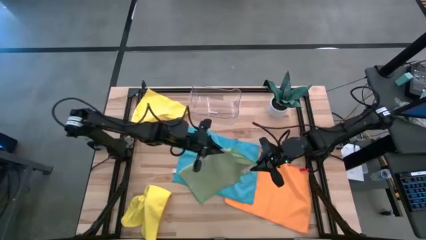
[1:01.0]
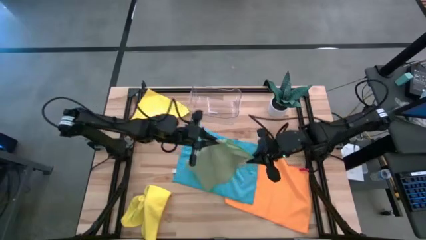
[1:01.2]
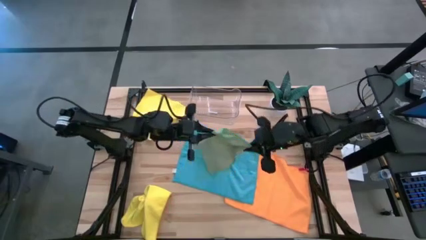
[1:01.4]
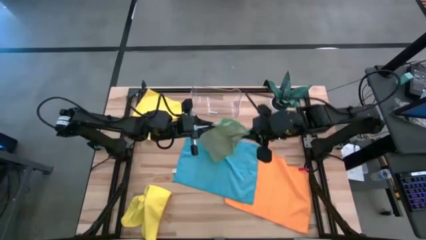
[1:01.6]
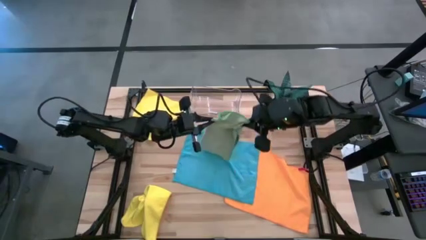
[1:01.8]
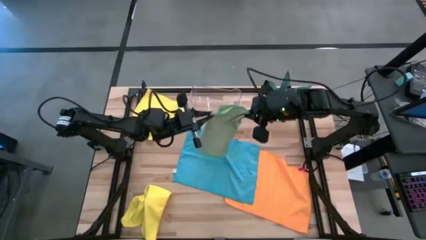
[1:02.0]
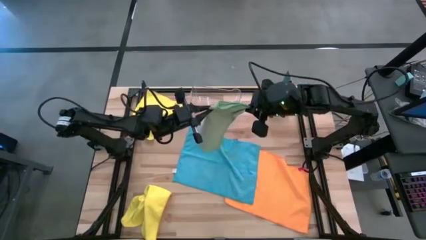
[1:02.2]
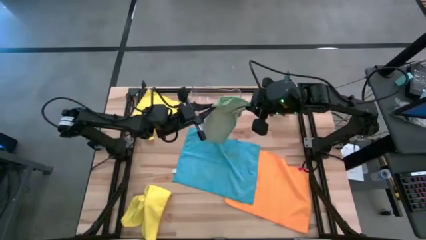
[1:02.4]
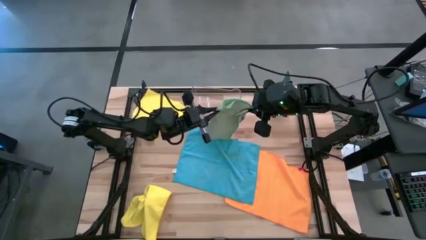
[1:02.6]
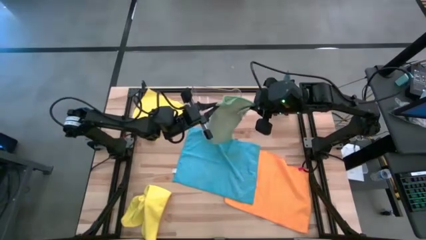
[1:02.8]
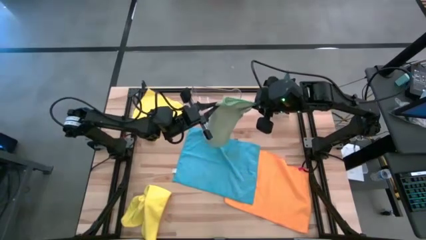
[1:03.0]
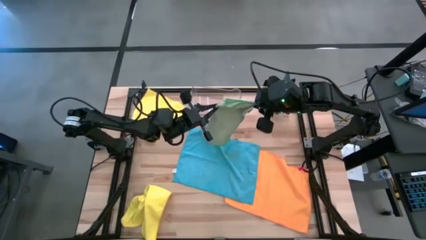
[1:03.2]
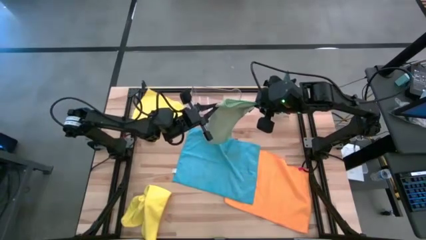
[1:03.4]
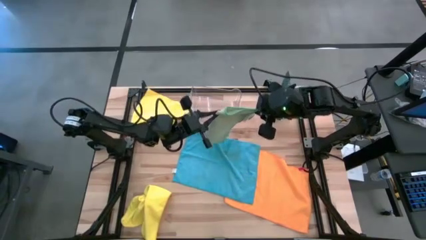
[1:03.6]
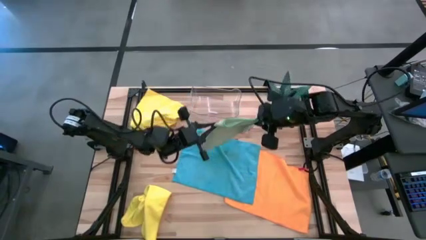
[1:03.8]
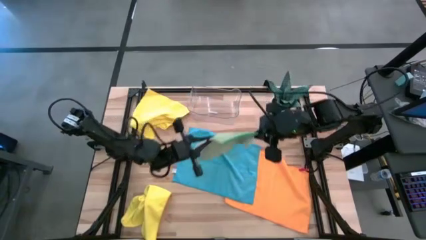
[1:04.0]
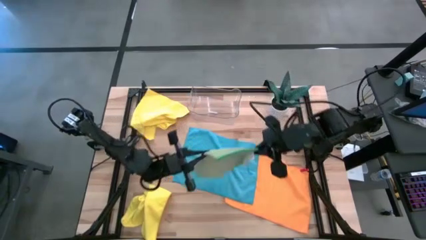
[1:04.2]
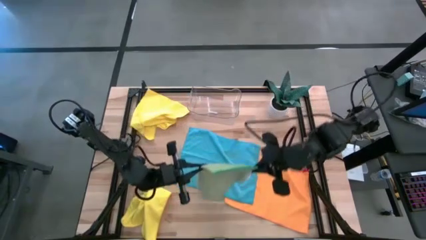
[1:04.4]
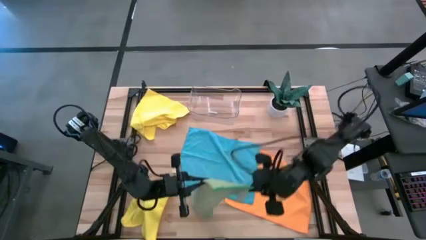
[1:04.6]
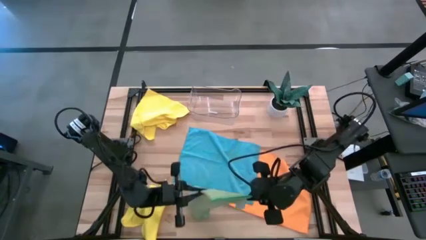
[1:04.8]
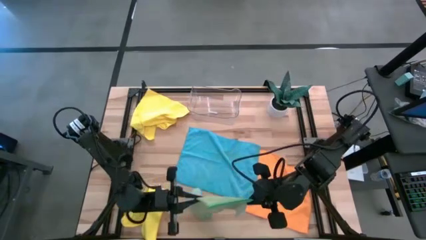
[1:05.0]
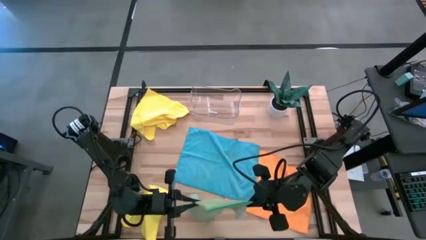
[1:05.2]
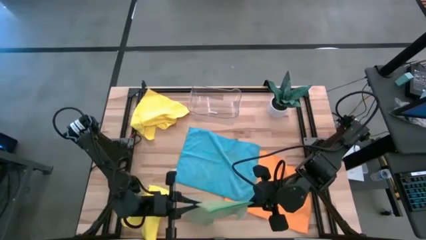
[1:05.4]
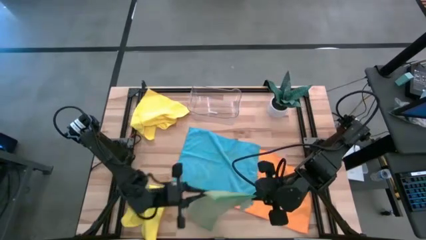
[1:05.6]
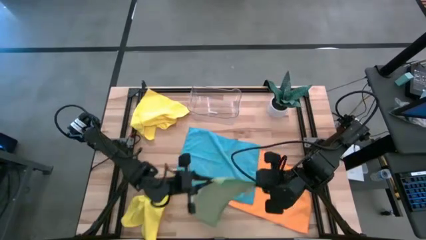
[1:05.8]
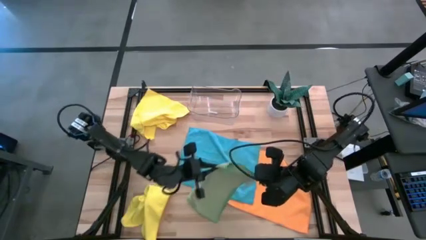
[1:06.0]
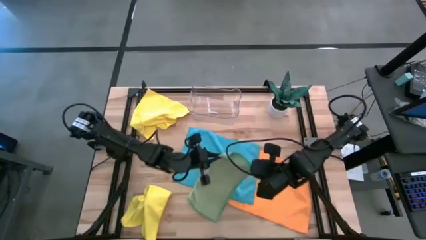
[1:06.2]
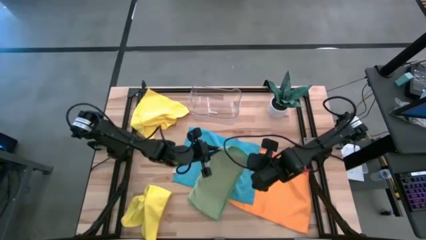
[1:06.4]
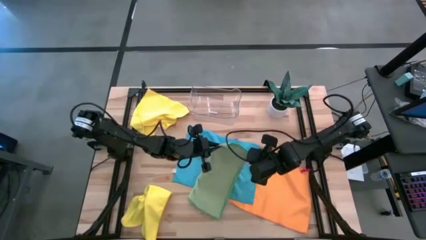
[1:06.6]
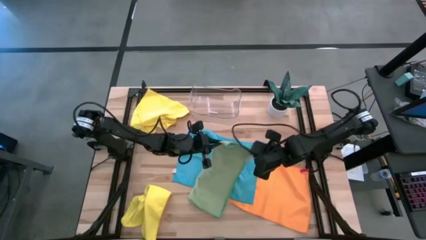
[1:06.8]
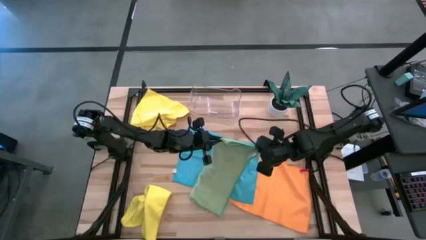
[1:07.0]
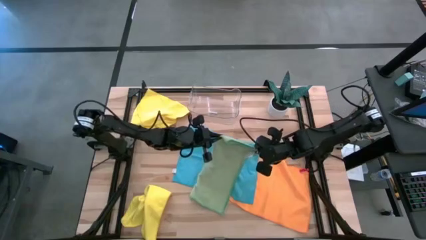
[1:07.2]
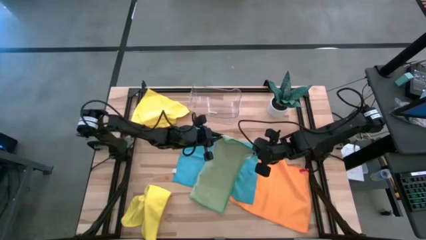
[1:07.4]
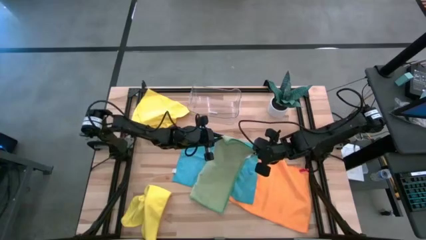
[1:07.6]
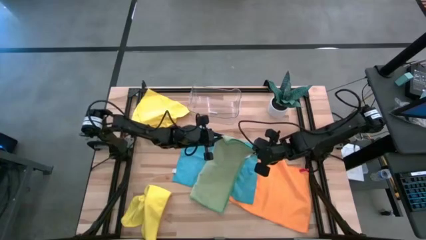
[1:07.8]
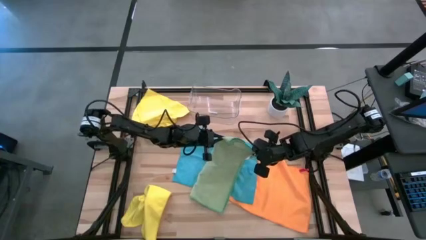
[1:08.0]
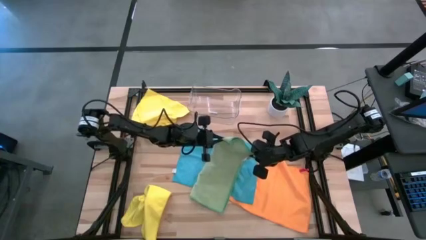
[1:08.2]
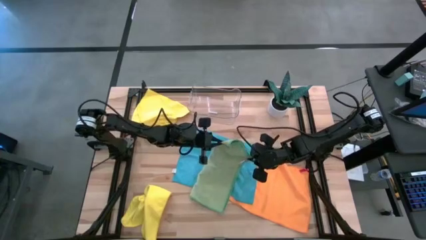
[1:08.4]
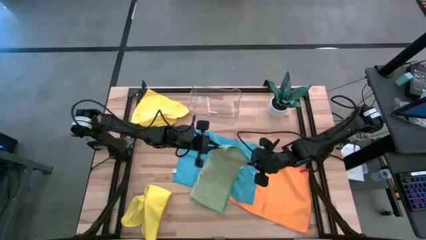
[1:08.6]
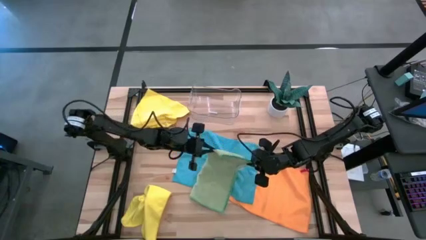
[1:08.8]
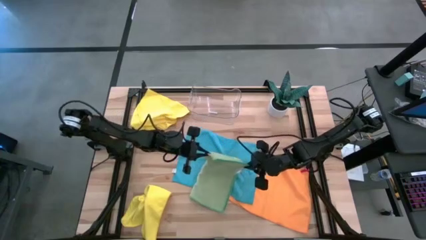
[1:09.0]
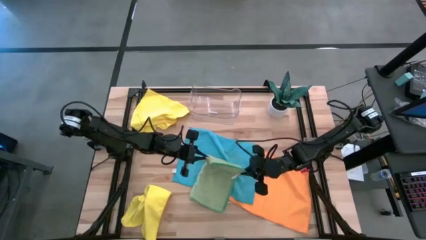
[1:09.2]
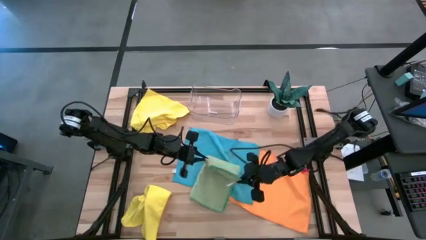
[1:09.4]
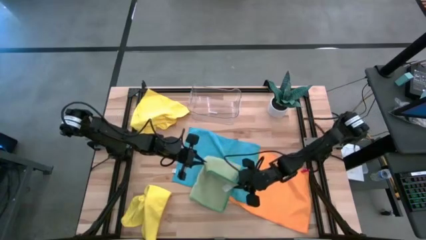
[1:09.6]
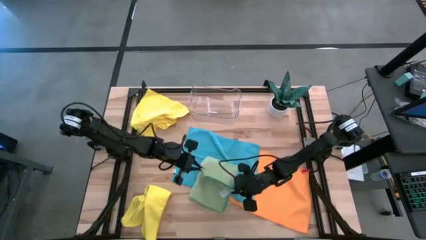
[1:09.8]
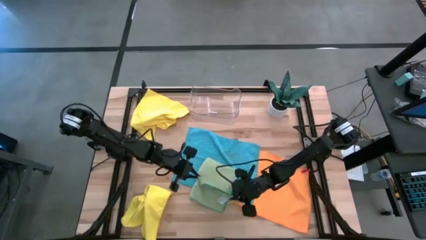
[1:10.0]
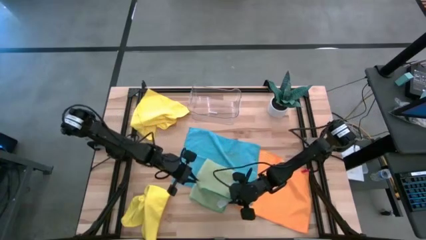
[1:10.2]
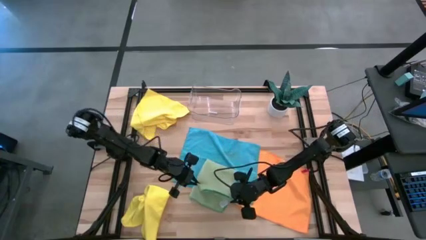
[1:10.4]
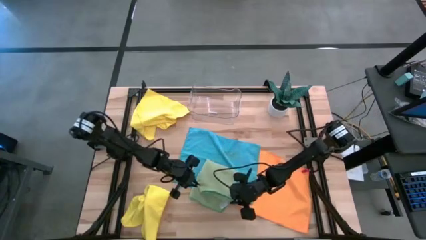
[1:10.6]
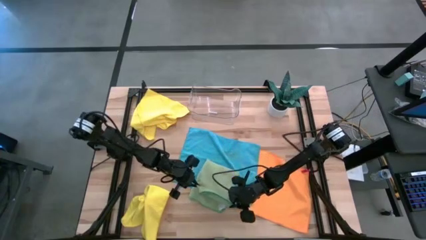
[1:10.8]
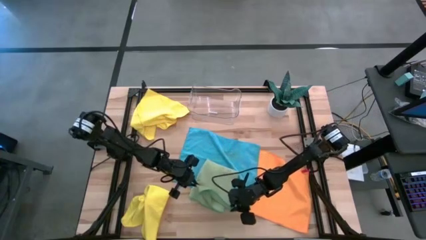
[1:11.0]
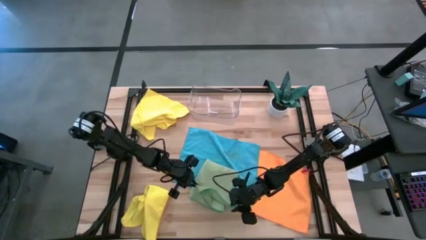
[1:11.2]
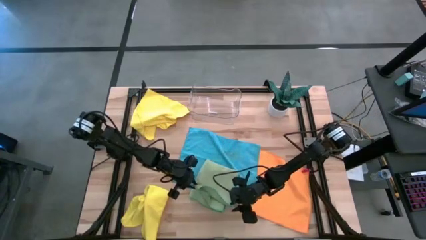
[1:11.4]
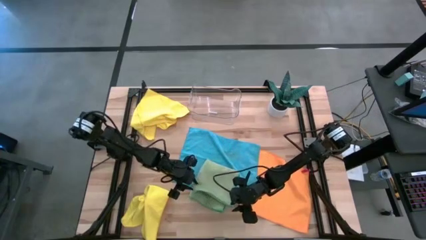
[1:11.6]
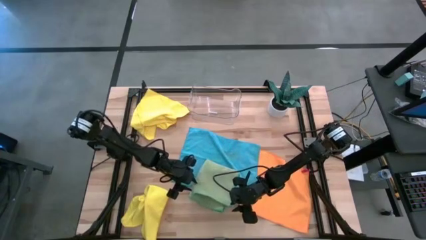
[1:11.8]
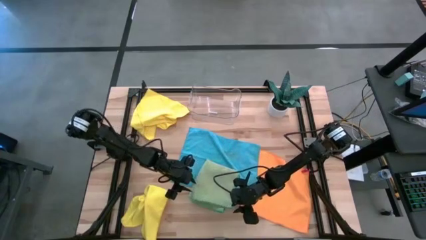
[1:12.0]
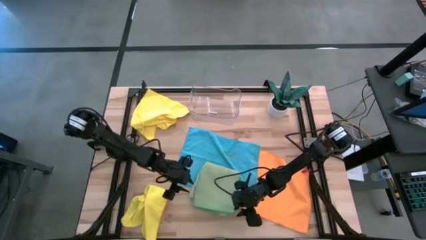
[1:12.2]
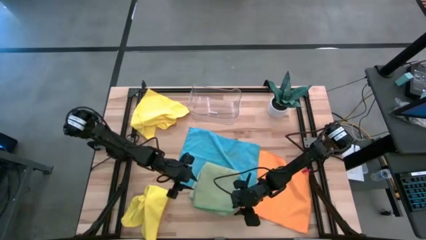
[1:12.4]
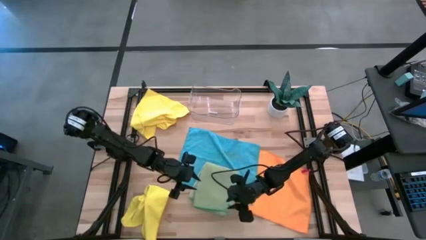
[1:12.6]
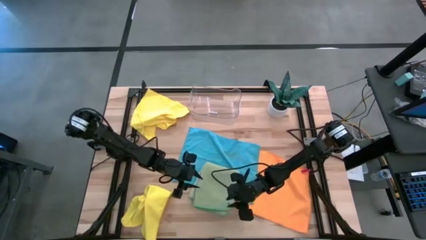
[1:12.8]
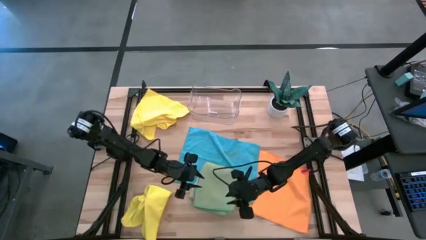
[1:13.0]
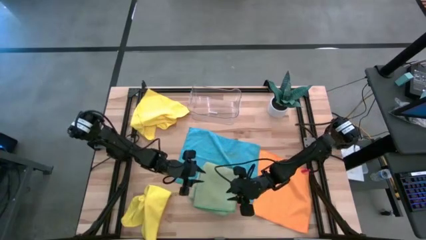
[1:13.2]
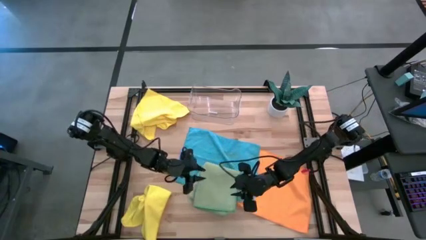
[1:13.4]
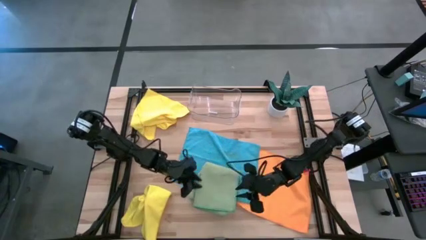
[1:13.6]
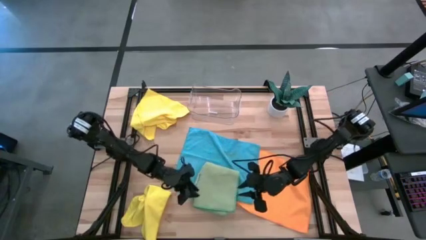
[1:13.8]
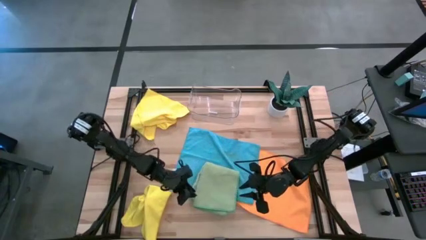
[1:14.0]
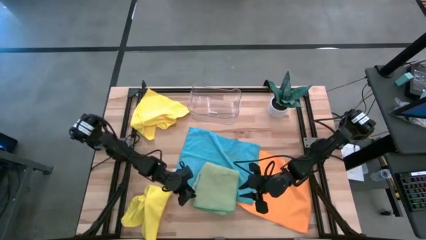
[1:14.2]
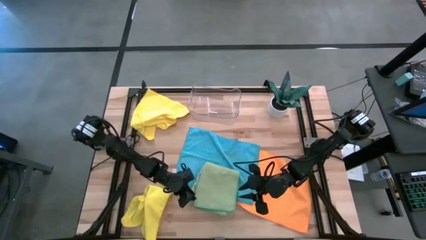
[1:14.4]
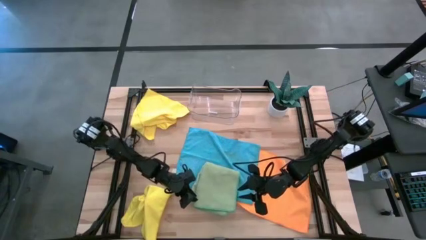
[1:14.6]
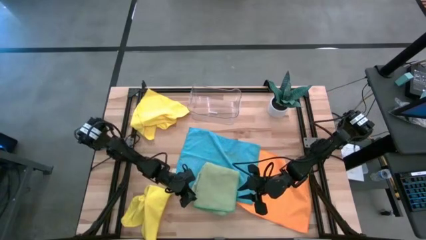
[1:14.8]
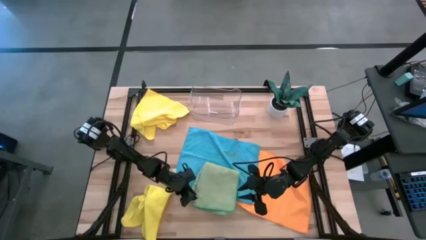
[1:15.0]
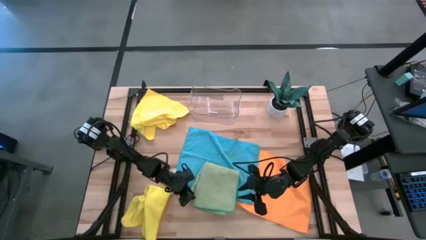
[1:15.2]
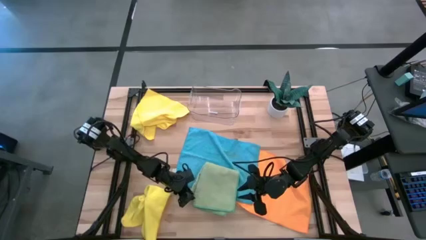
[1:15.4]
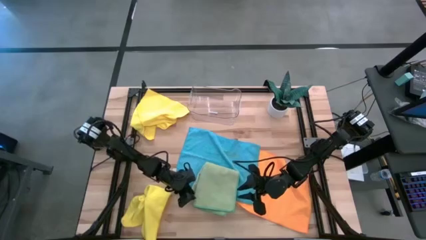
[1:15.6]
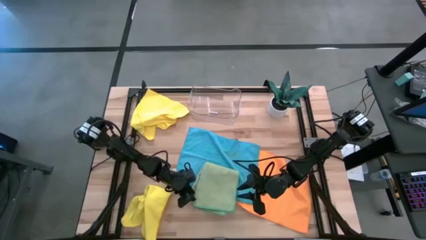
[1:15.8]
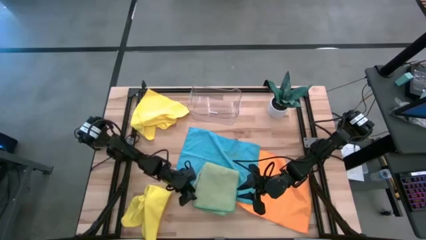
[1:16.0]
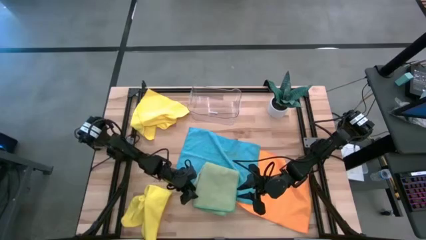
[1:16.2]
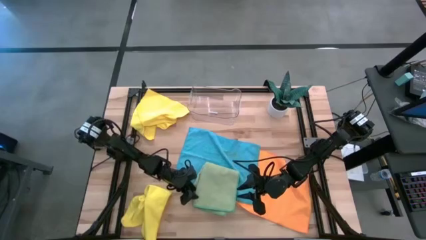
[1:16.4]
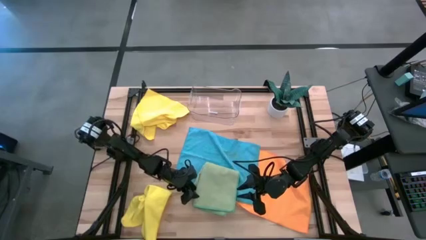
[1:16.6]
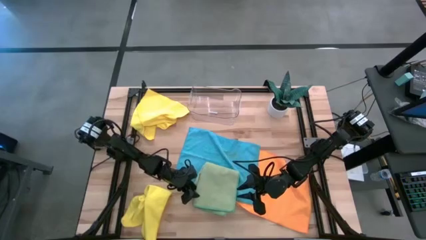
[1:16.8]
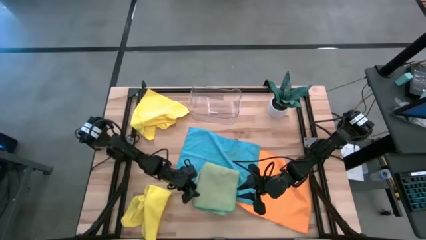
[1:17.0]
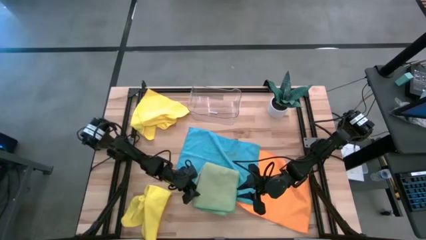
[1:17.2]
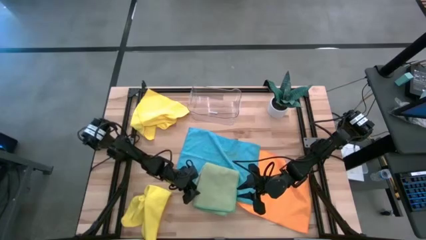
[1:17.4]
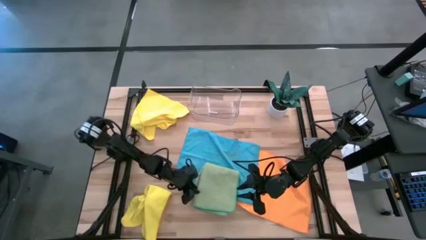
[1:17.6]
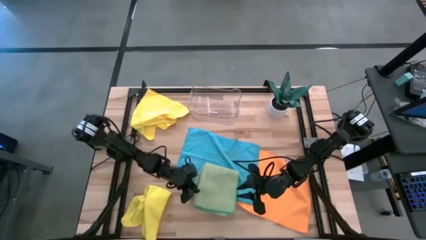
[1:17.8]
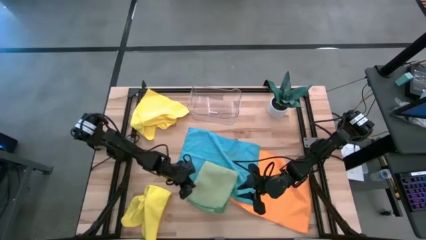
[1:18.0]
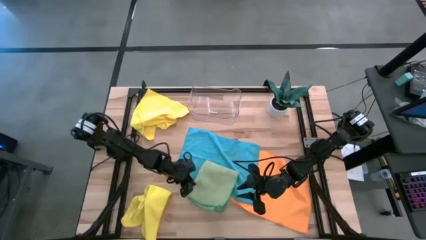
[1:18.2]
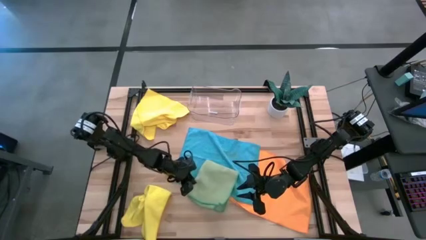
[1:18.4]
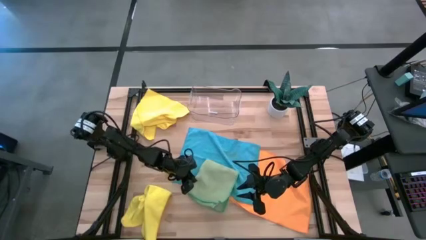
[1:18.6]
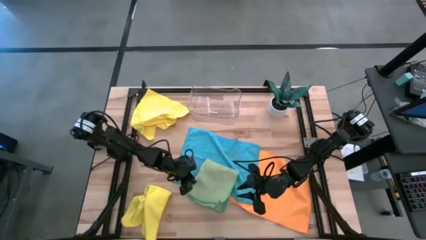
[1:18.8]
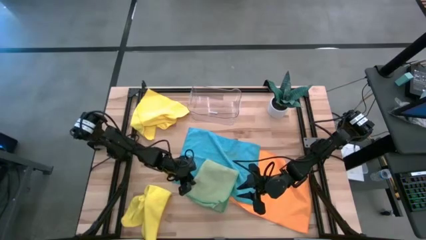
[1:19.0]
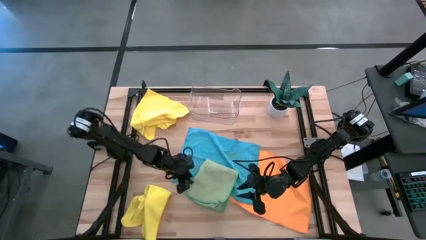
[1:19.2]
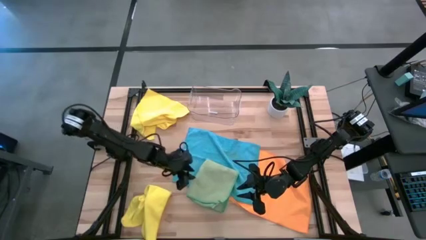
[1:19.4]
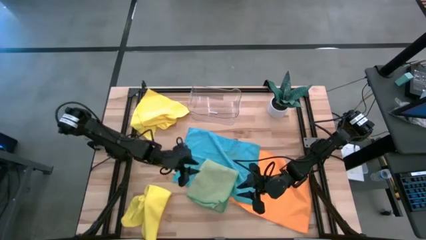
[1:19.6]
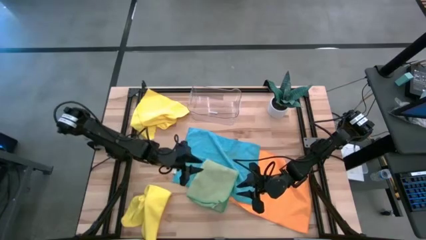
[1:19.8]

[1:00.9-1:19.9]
Task: Fold microfiber towels
Fold the green towel
